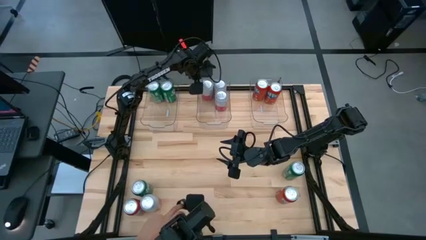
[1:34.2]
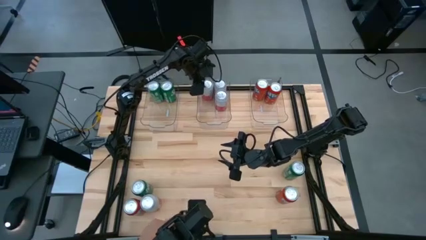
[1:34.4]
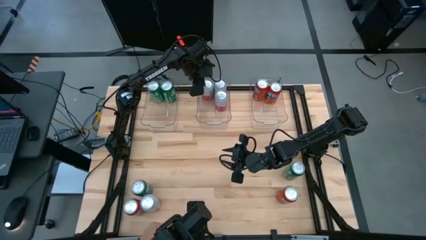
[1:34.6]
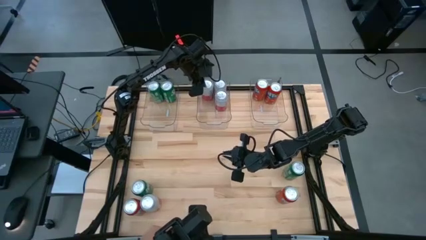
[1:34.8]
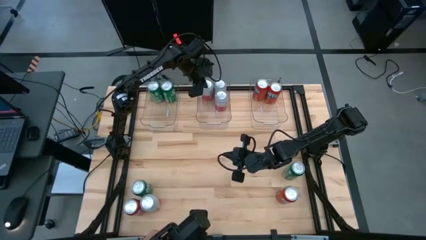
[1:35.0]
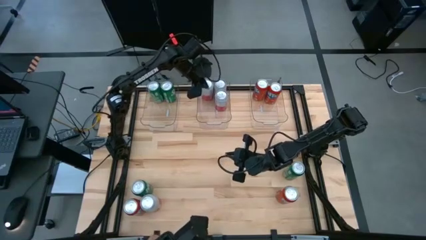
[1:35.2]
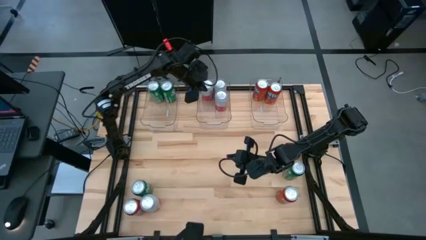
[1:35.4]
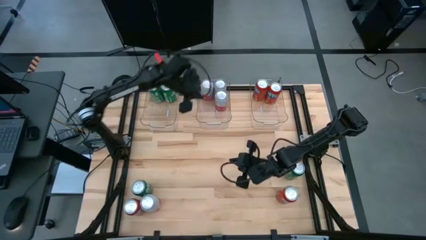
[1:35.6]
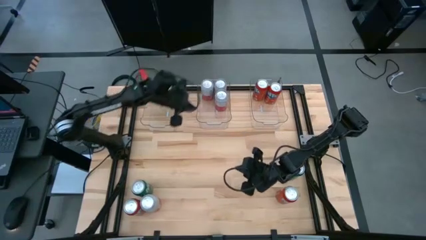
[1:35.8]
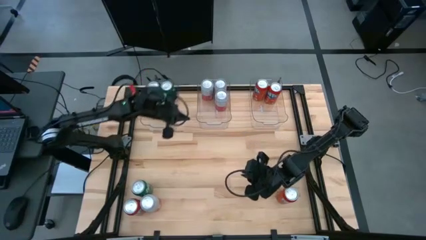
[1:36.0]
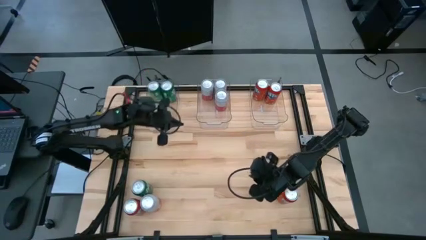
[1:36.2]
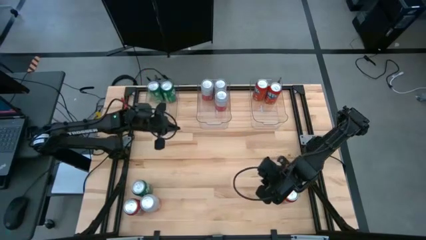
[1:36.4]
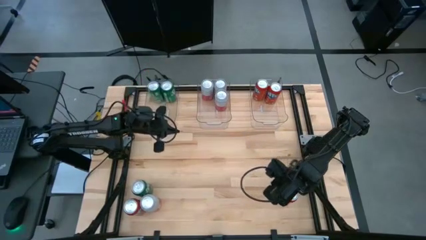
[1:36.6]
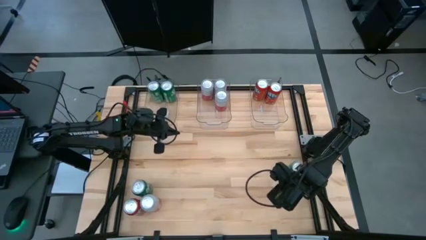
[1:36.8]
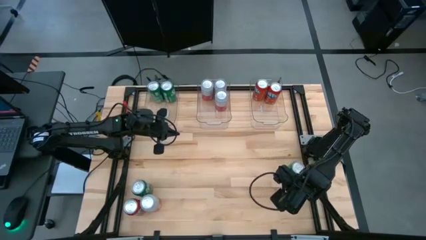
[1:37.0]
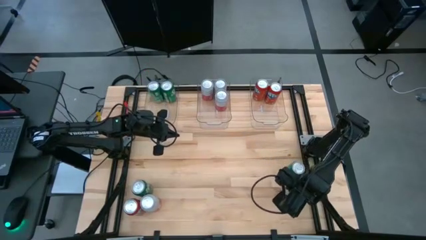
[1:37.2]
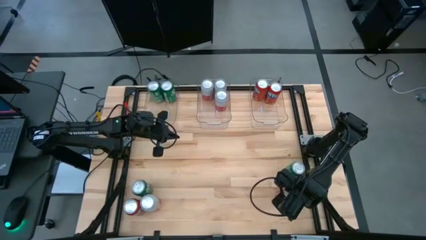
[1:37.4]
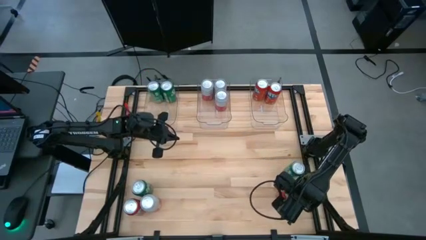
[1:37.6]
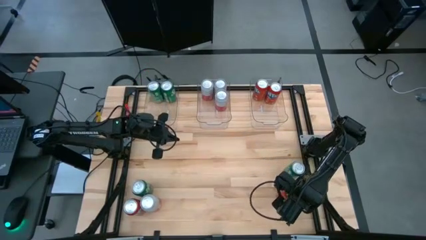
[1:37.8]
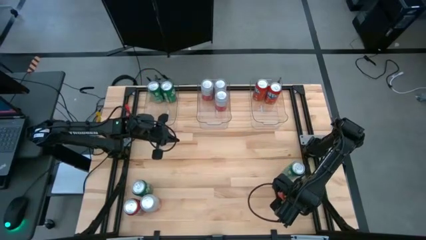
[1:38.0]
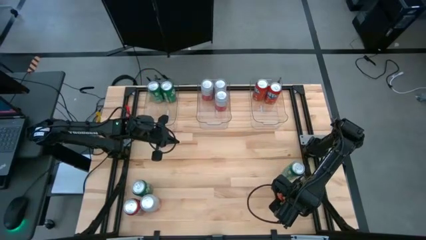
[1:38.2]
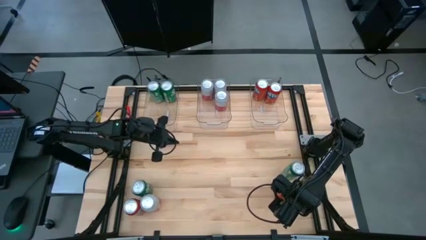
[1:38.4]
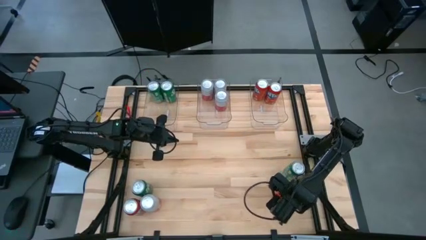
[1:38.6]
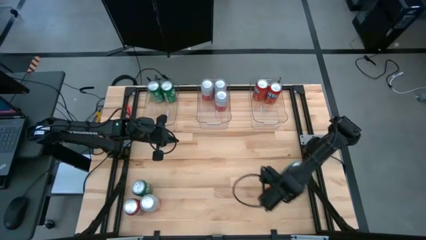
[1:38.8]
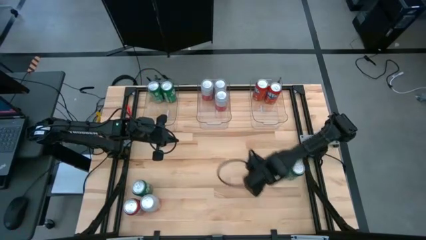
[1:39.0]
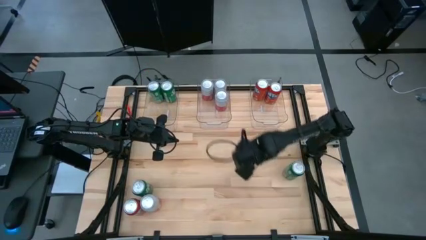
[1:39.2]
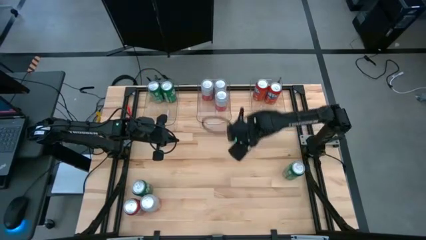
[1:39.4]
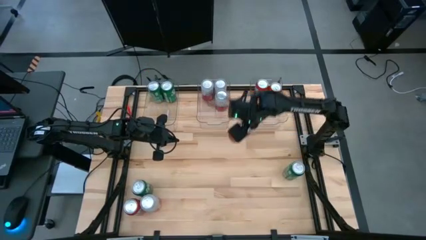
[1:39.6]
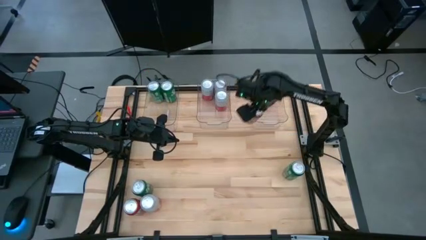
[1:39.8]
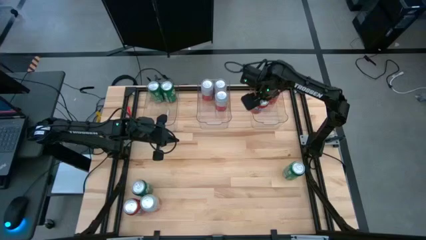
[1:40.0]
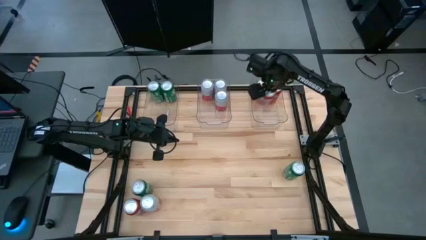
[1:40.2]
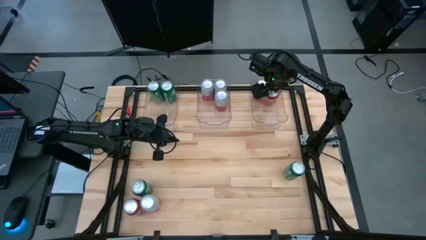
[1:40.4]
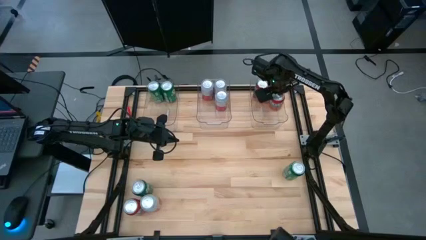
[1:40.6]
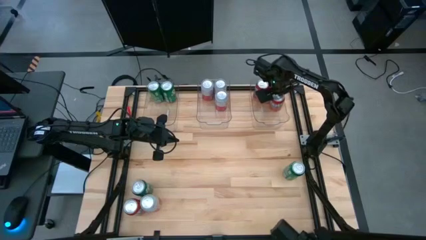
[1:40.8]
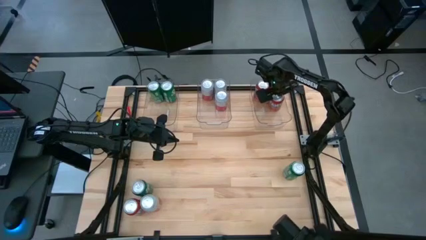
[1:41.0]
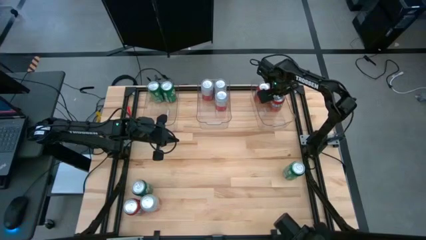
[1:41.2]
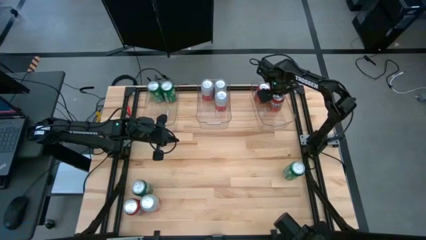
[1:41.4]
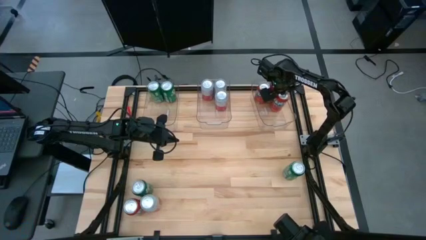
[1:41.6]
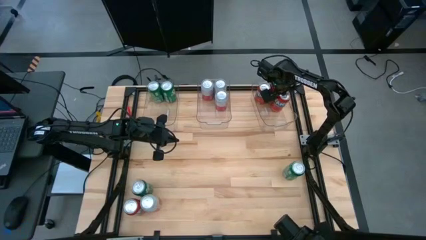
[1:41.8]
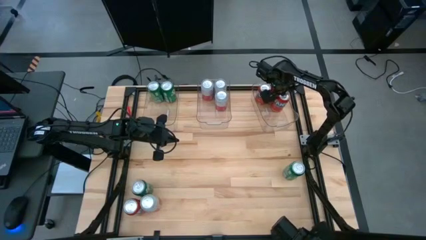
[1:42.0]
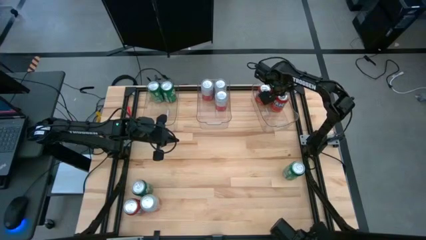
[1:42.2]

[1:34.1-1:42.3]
Task: Sort soda cans
Put the red soda can into the right transparent bin

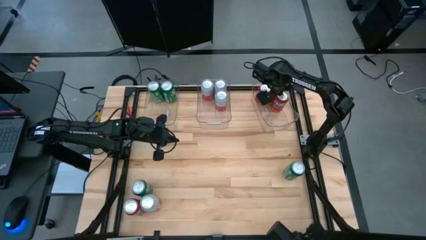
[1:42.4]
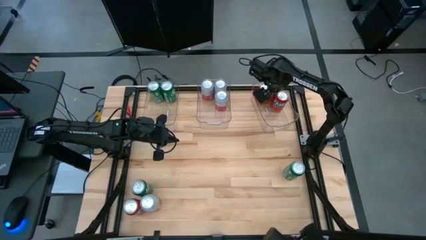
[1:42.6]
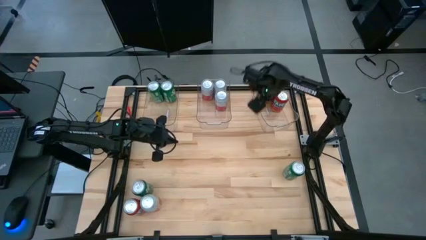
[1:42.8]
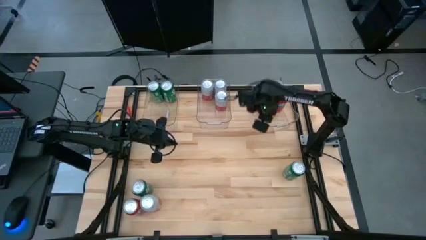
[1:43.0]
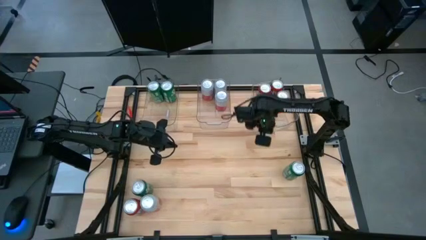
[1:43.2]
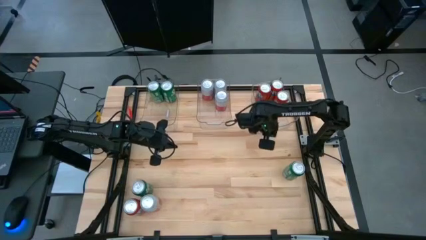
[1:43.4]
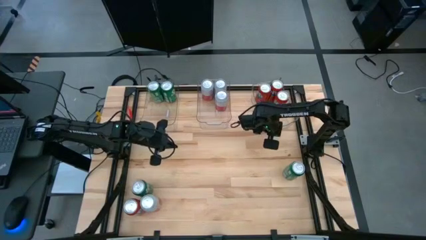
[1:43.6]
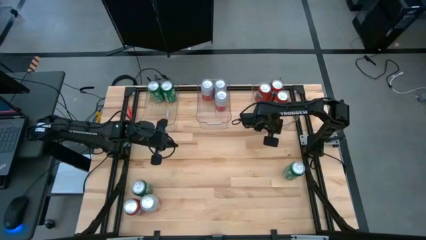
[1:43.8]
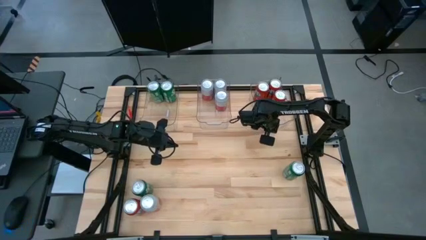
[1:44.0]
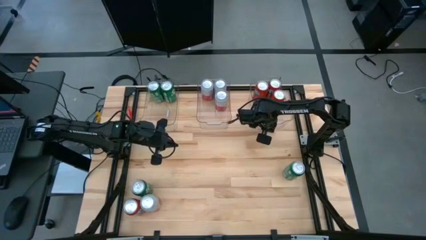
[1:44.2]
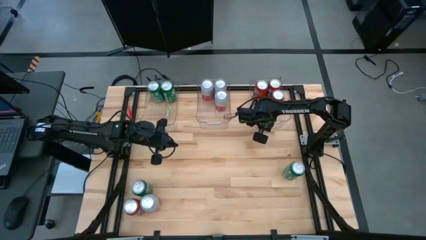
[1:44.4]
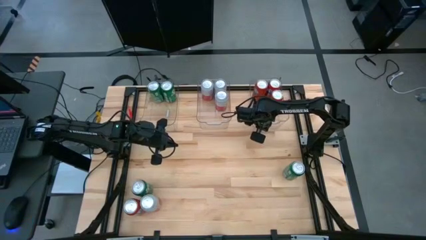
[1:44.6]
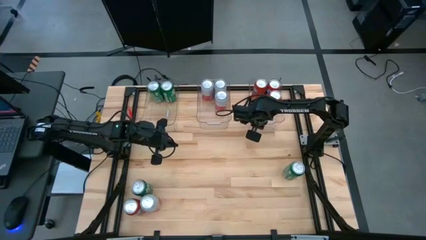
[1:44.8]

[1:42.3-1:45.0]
Adjust the right transparent bin

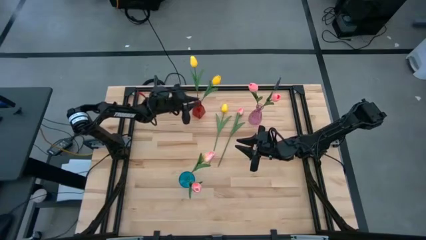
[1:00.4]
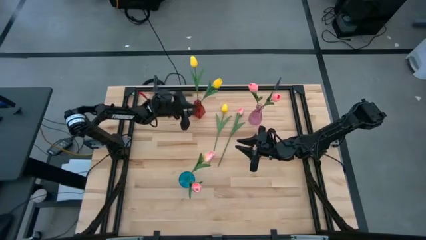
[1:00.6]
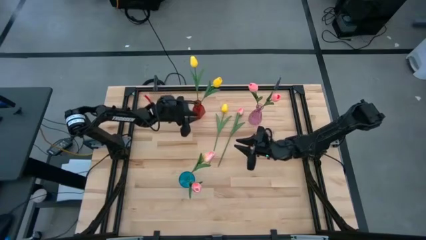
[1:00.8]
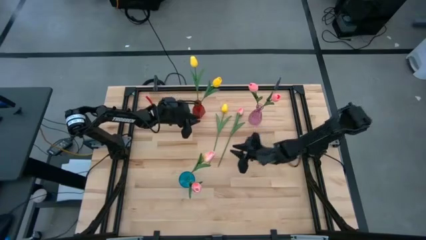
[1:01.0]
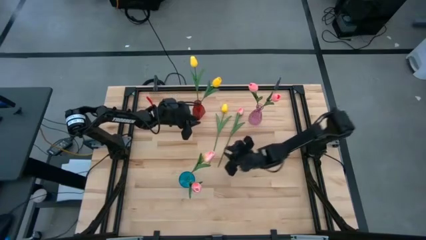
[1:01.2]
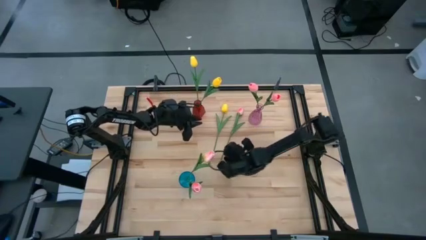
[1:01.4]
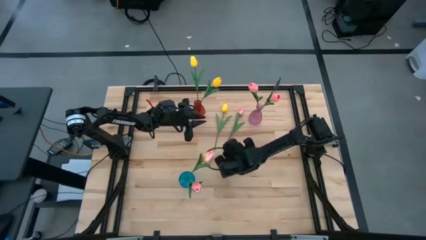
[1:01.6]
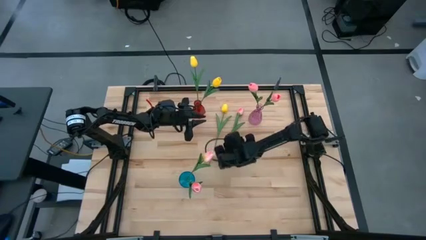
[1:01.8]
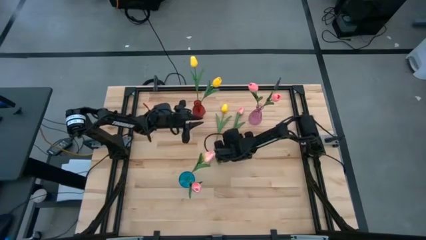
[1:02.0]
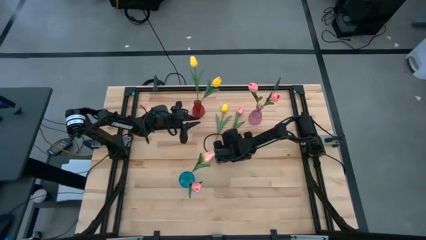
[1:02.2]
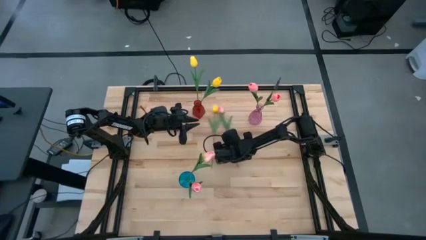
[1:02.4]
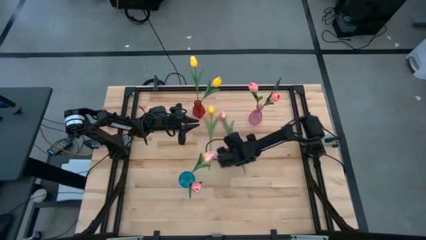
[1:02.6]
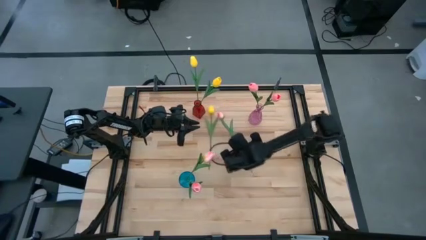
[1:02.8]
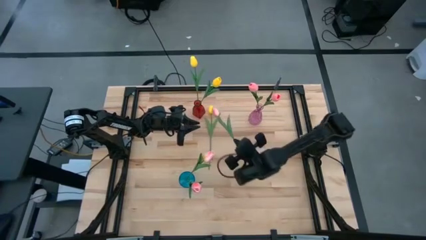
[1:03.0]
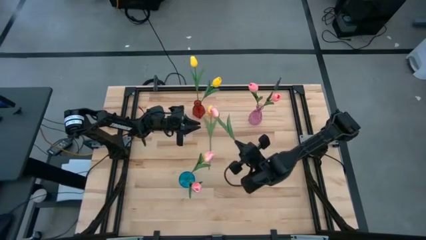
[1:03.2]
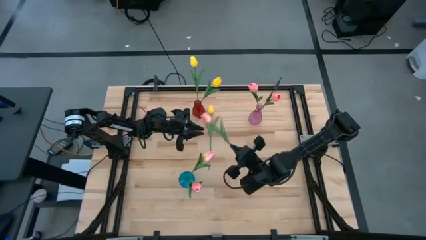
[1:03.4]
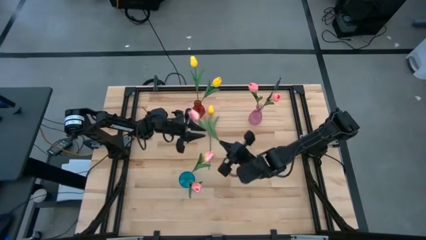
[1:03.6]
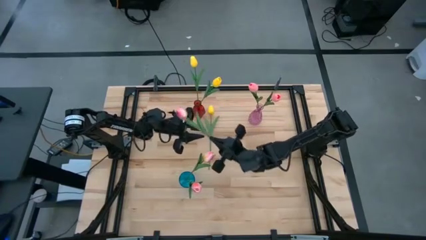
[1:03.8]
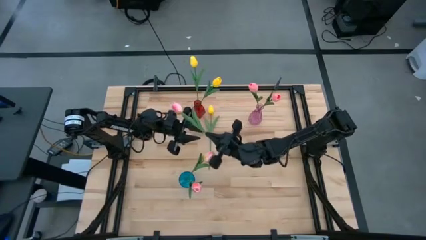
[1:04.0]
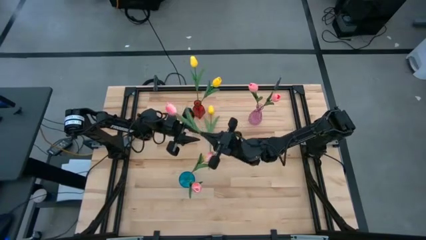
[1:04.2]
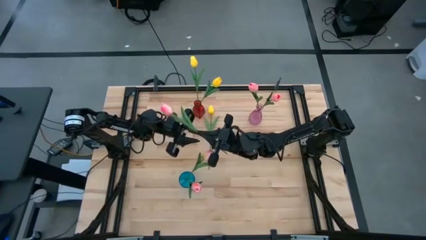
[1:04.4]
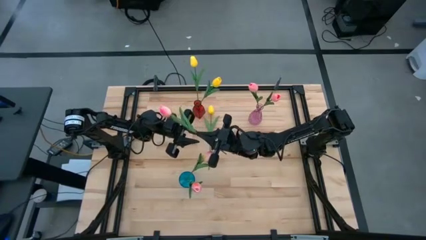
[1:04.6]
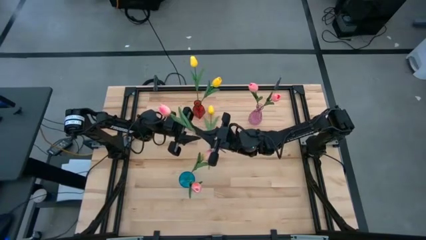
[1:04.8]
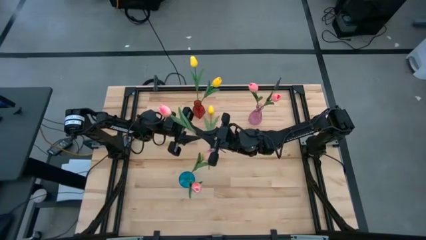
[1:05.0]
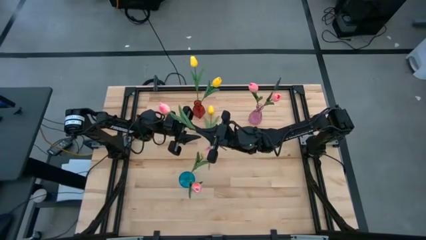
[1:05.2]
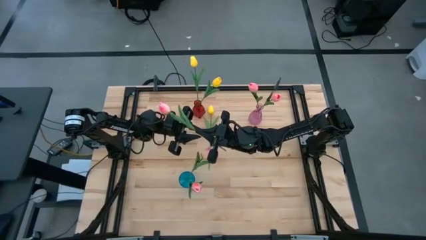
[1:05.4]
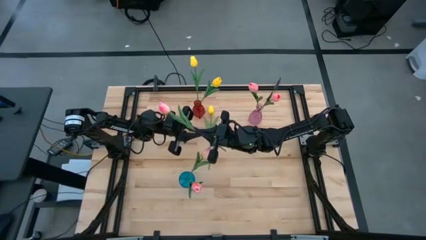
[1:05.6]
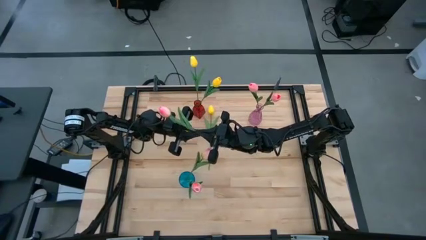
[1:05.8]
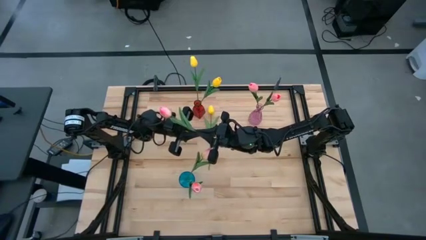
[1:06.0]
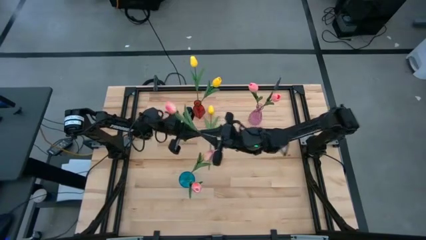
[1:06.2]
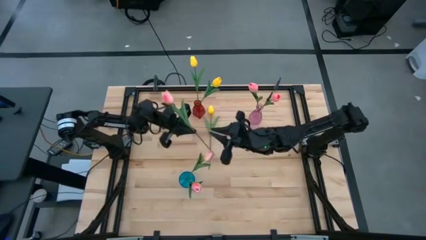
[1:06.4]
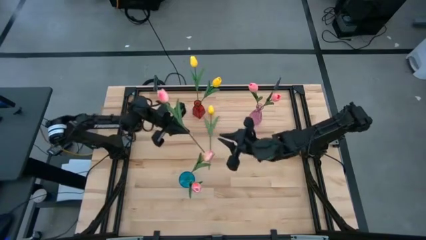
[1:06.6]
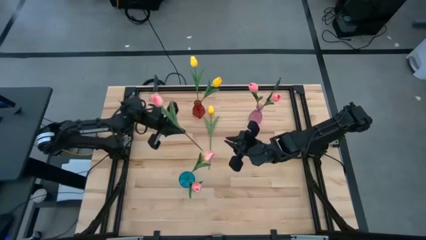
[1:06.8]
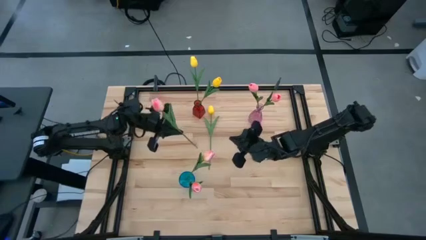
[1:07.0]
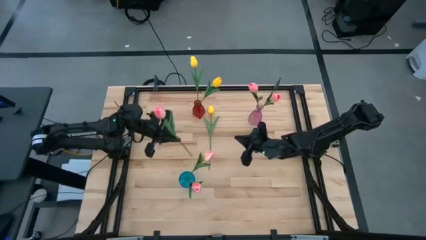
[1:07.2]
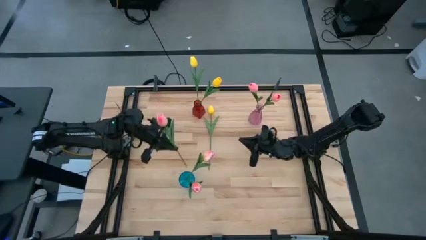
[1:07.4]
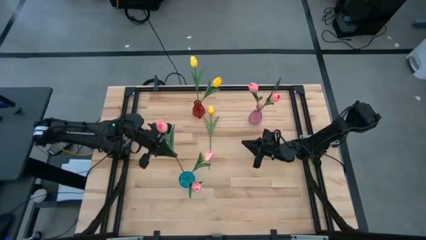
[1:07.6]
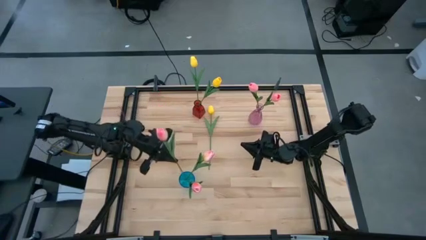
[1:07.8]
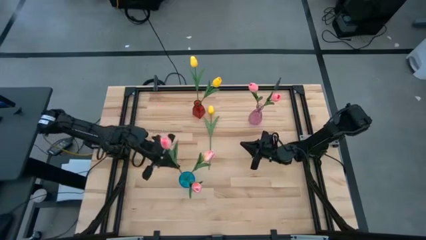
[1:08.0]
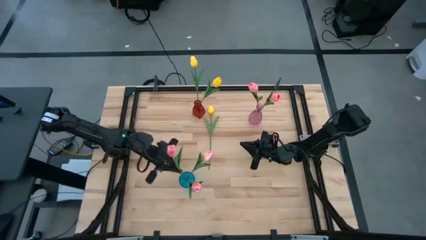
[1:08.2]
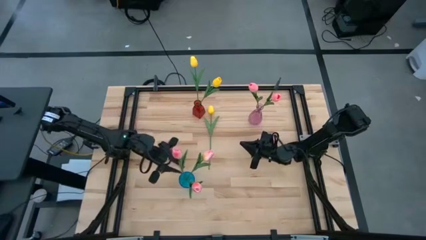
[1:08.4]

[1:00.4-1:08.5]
Task: Sort flowers into vase by color
Put the light pink tulip into the blue flower vase
